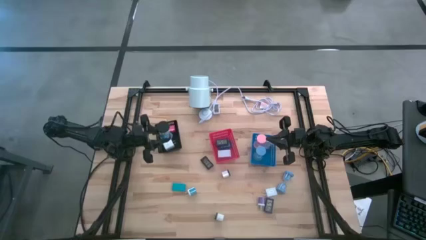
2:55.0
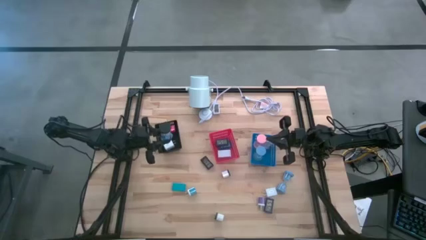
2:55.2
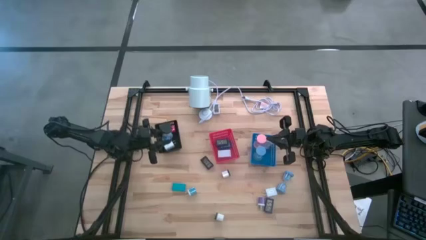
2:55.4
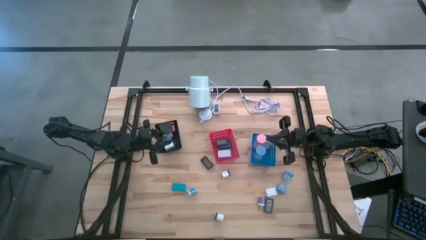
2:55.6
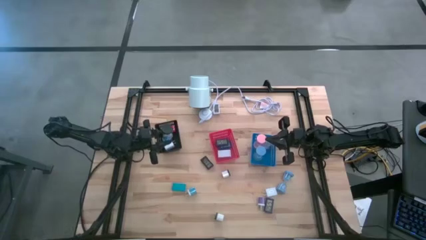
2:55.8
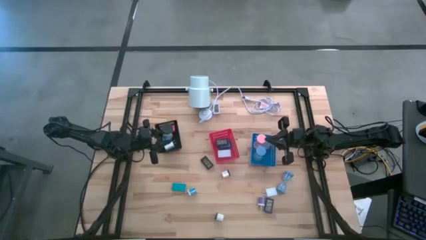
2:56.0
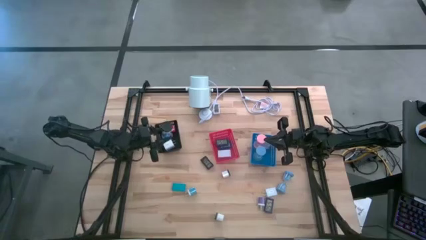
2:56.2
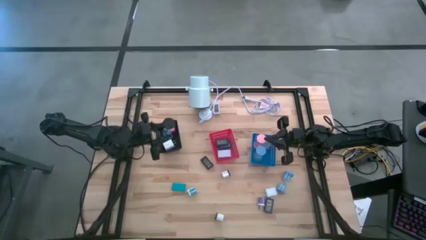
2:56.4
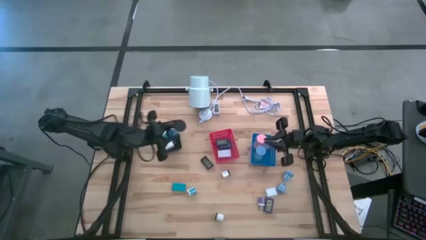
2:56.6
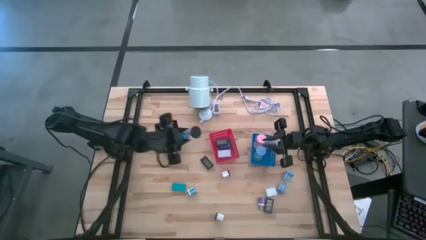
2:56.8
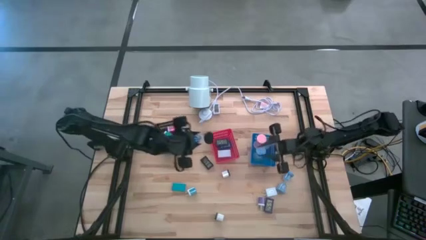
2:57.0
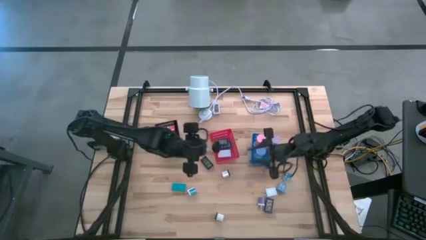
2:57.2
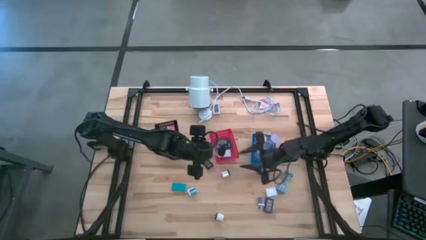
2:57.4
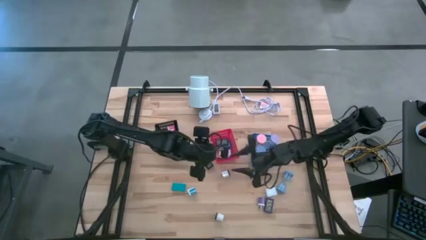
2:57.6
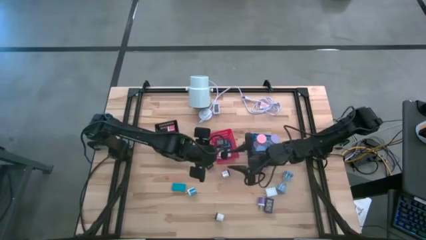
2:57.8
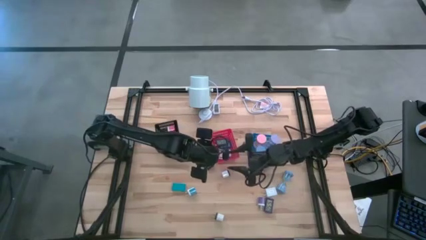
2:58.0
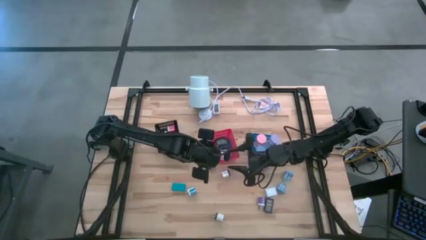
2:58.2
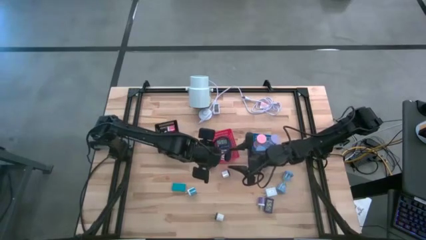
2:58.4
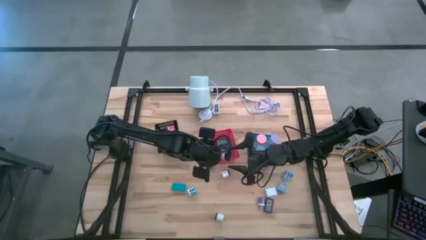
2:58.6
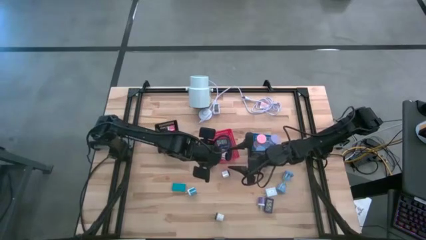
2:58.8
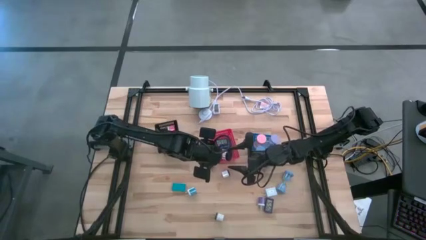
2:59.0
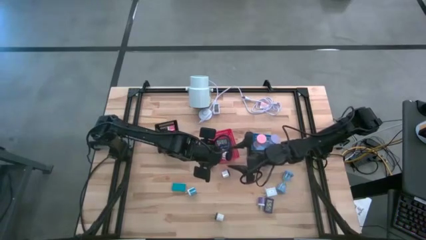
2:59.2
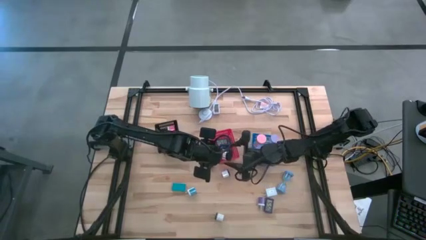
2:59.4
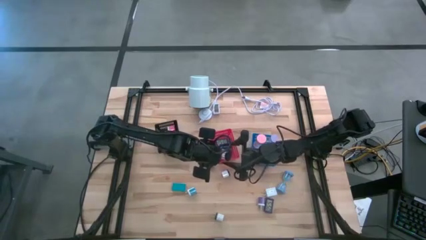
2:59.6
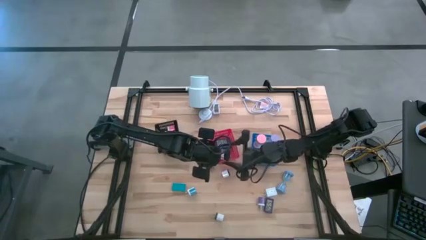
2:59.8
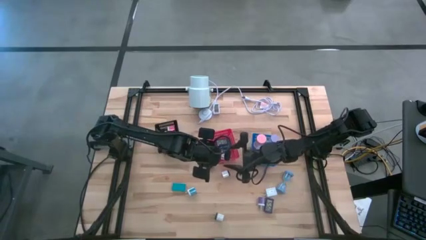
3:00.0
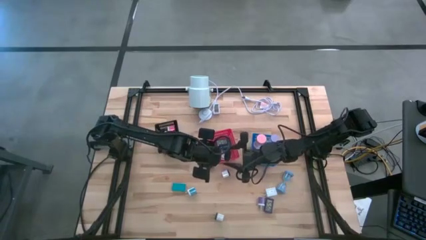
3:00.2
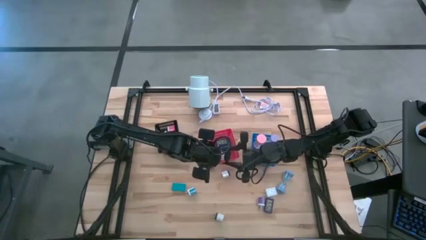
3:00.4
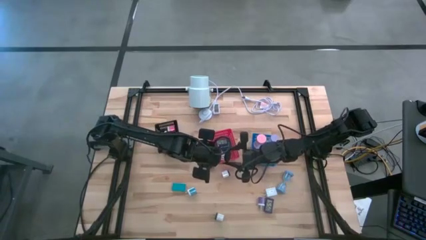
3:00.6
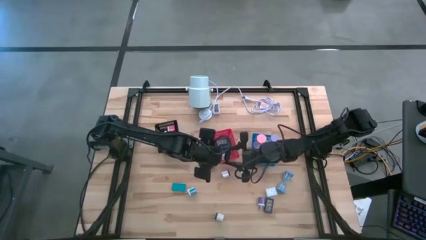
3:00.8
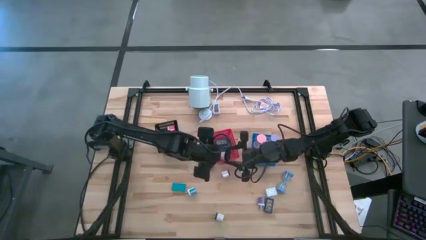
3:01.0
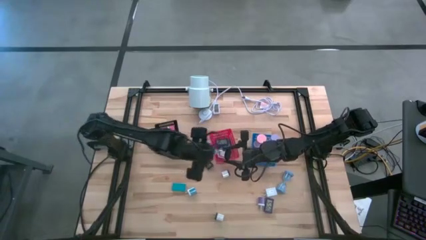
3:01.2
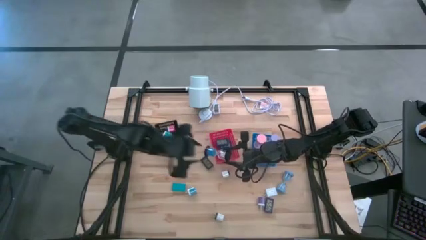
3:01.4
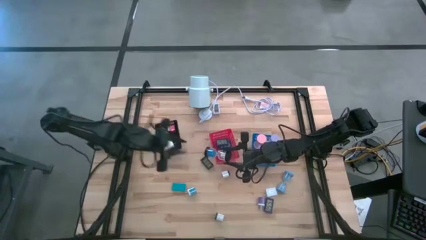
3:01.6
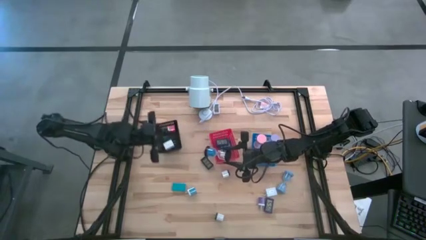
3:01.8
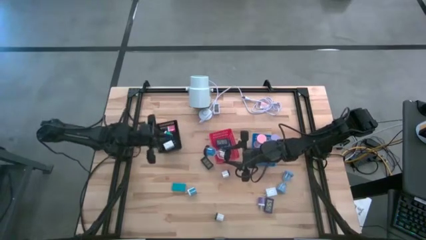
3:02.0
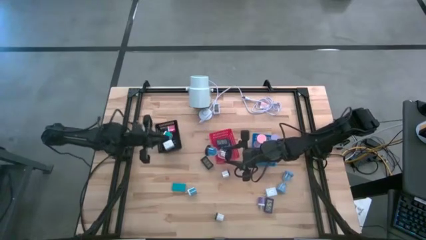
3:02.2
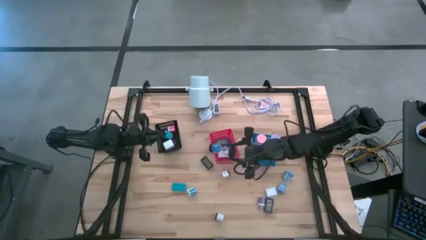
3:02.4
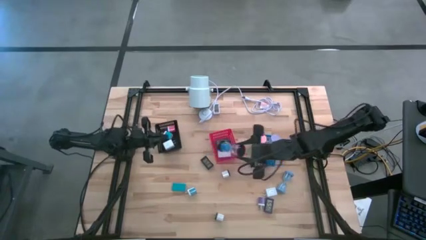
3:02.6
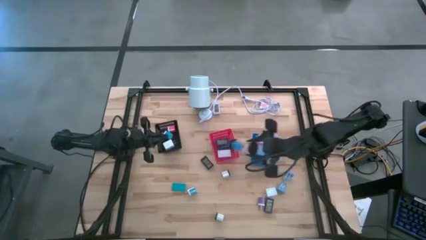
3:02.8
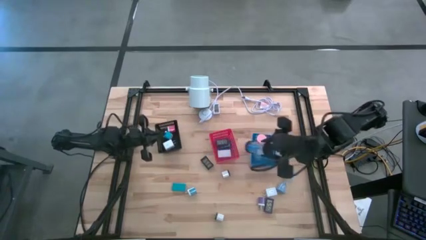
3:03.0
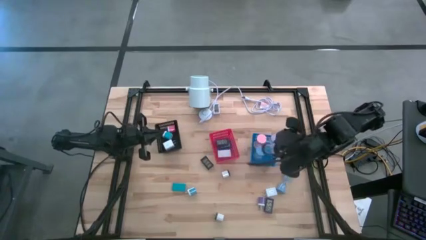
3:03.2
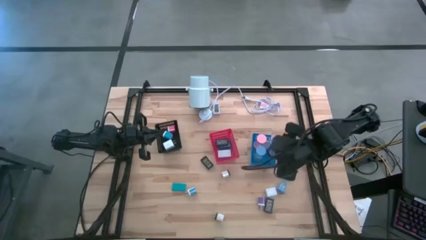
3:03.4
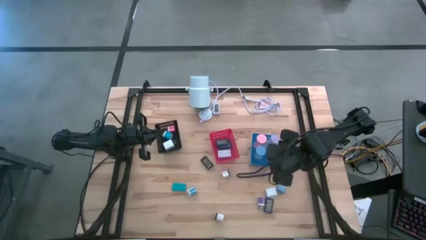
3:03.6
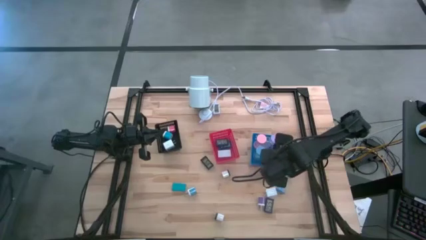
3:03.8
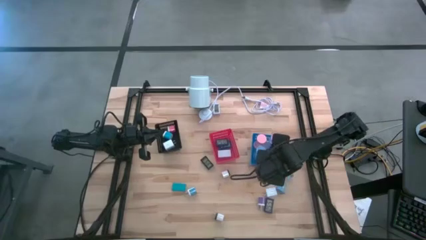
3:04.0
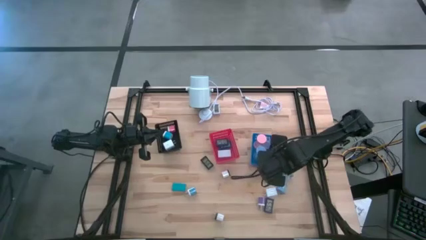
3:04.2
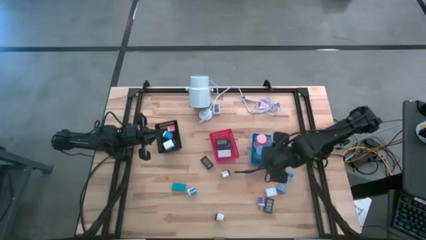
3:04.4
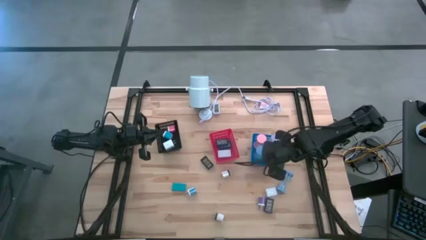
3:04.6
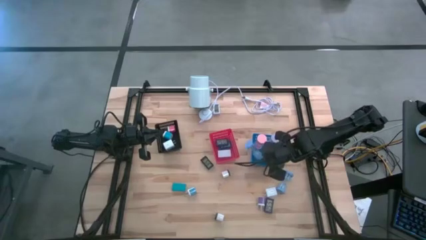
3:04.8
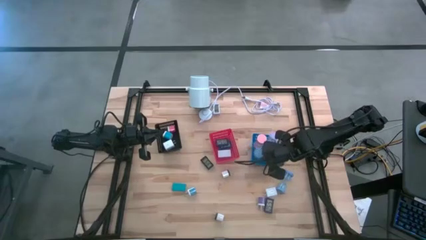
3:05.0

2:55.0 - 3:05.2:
Task: Pick & Place Office items
Put the black hourglass into the blue bin

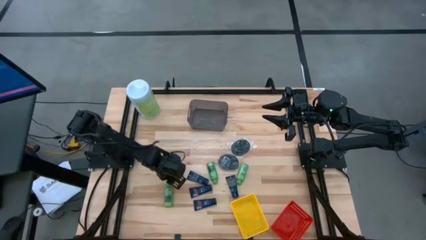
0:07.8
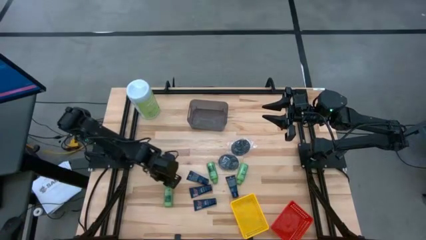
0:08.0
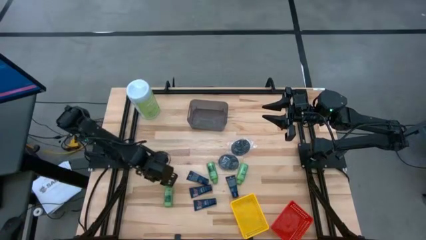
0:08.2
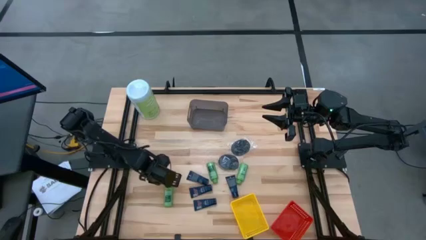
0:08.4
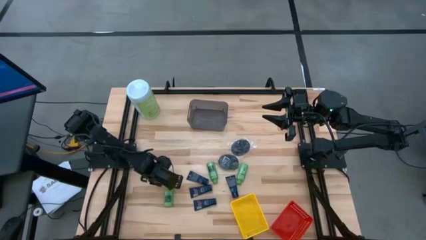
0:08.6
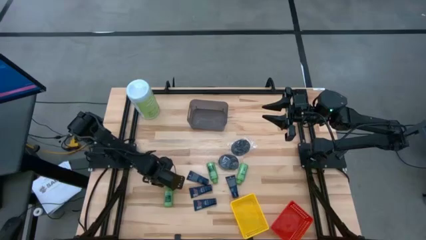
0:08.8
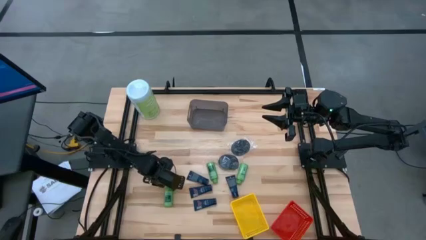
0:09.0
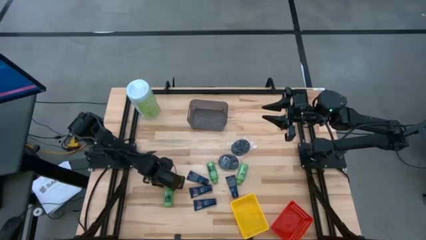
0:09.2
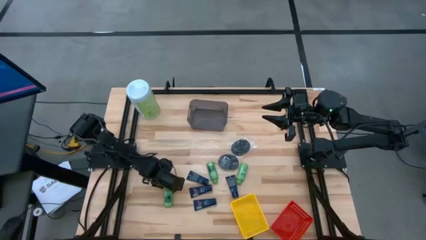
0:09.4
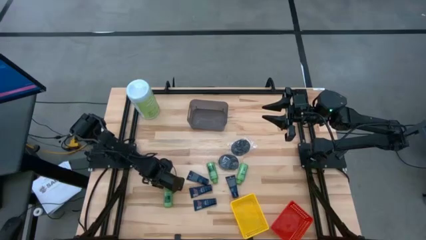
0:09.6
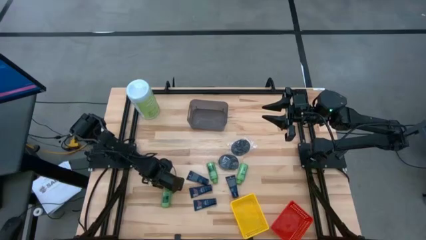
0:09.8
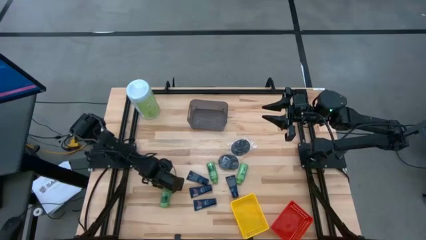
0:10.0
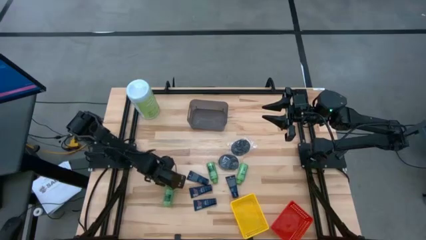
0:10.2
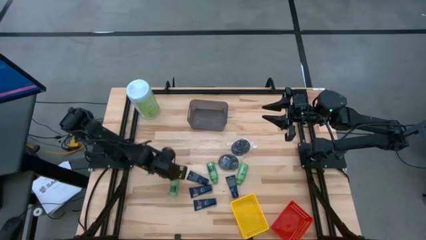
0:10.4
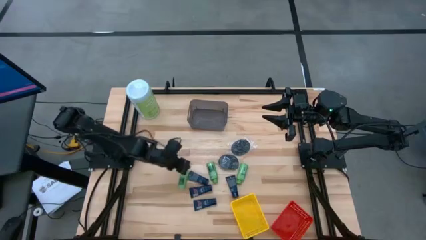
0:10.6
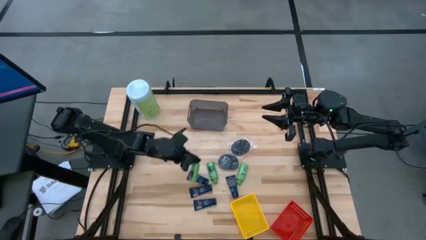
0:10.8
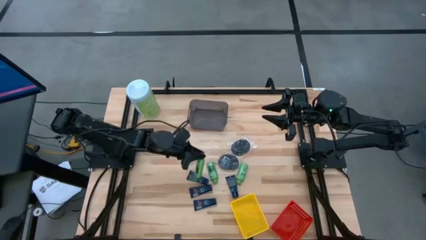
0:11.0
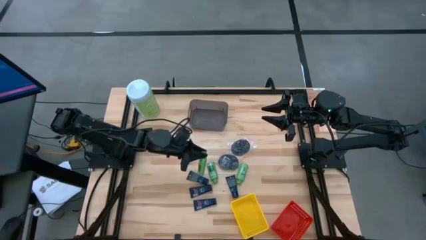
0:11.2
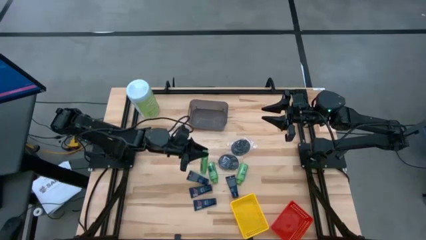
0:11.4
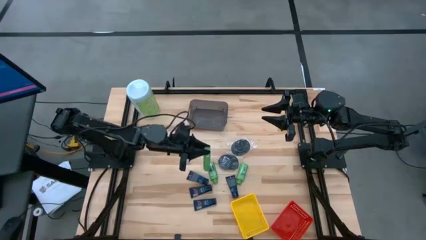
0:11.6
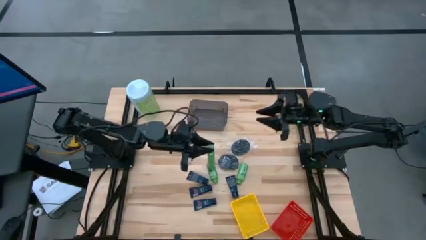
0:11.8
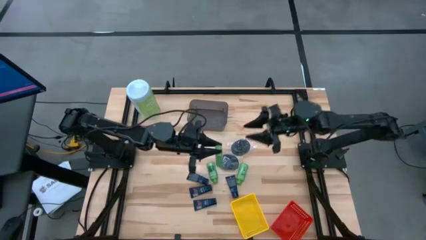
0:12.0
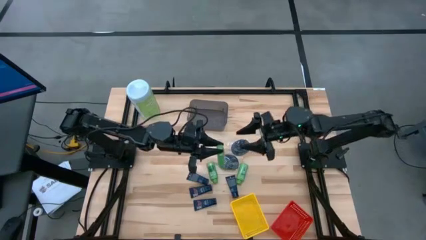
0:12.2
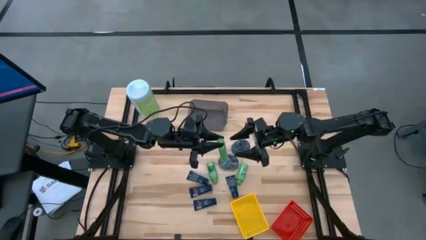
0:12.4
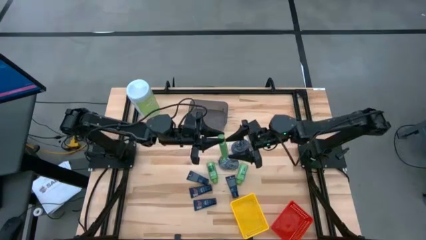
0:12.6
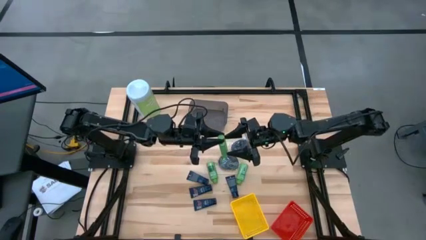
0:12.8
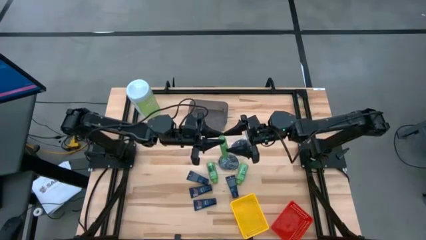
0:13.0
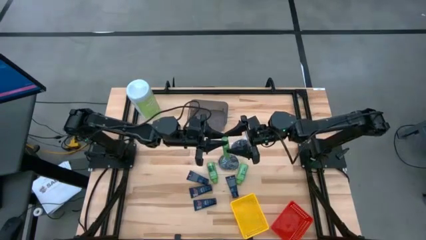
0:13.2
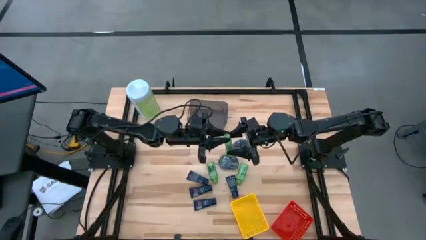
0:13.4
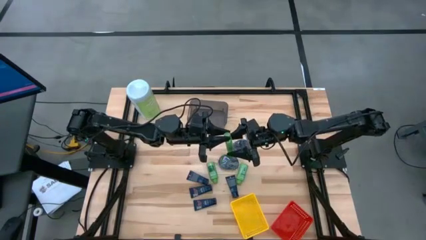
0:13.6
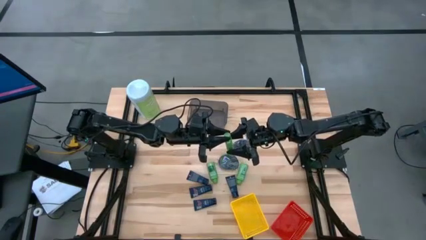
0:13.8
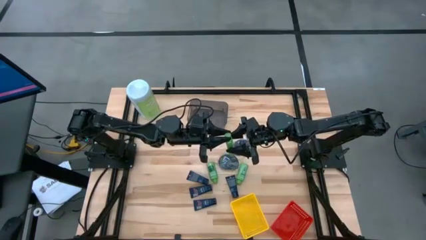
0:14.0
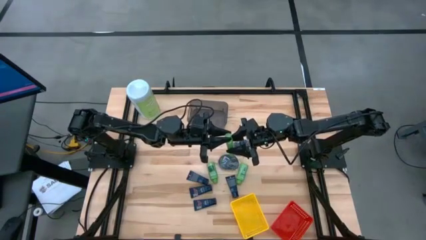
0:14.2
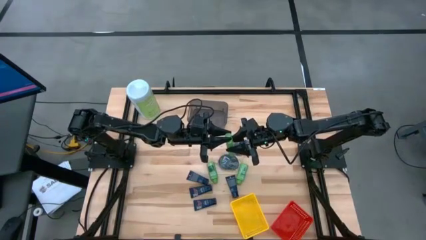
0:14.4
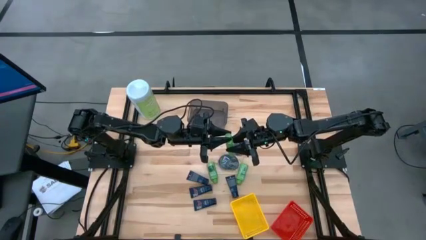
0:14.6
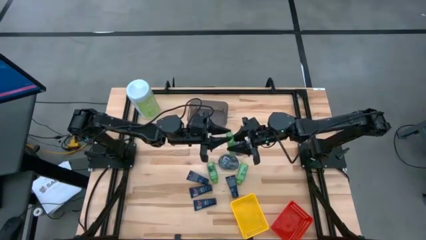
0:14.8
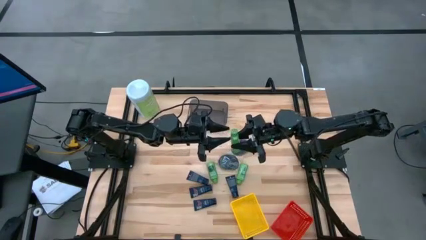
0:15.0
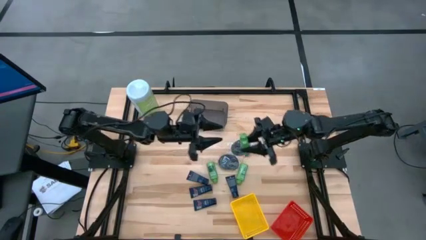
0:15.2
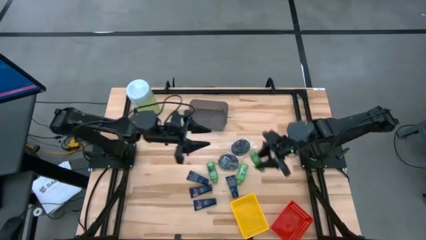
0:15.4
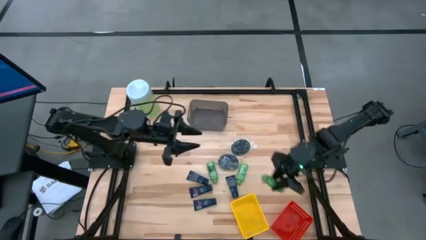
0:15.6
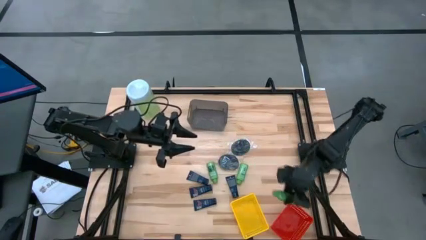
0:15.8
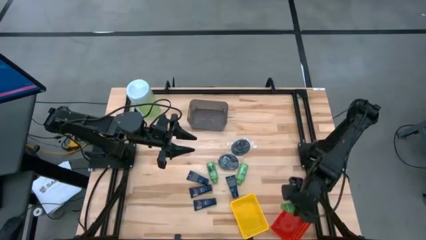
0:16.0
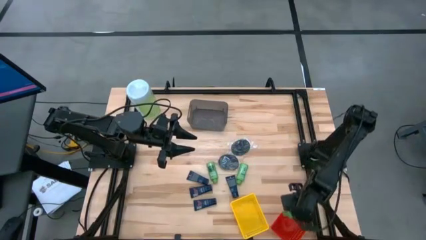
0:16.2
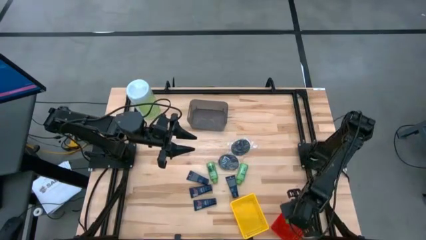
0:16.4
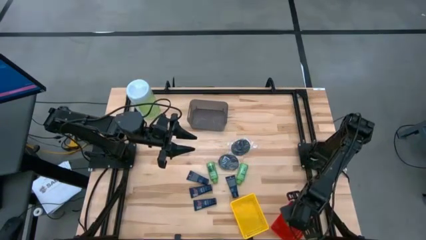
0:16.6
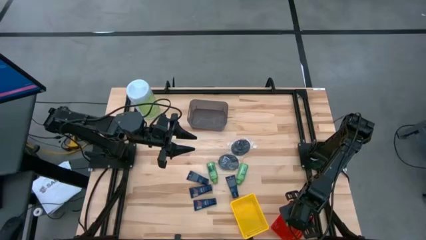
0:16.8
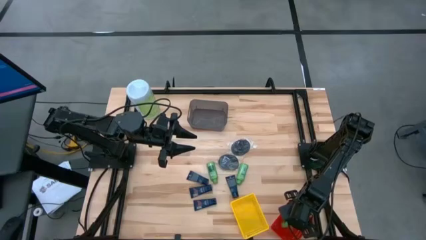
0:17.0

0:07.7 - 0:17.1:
Task: Pick & Place Travel size toiletries
Put the green shampoo bottle on the red bin
